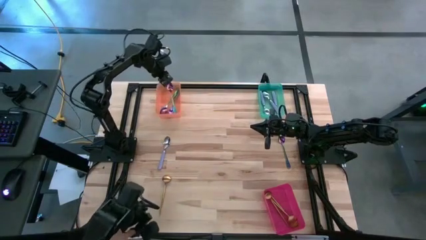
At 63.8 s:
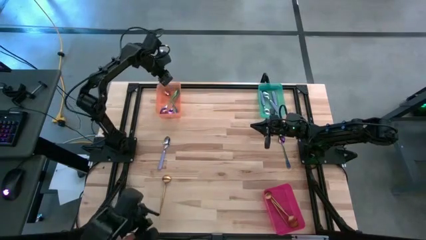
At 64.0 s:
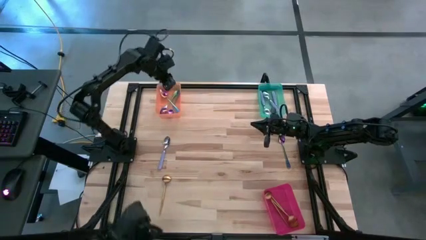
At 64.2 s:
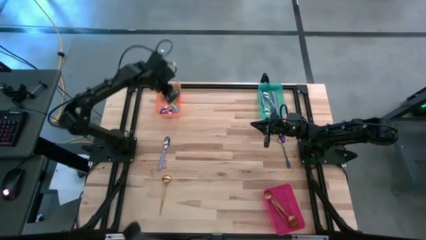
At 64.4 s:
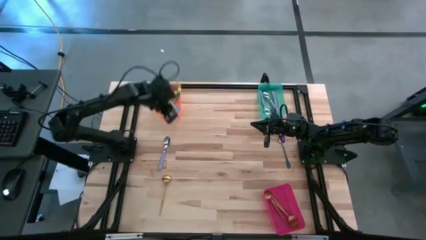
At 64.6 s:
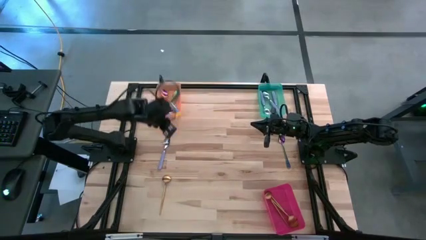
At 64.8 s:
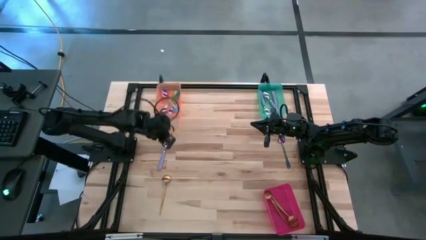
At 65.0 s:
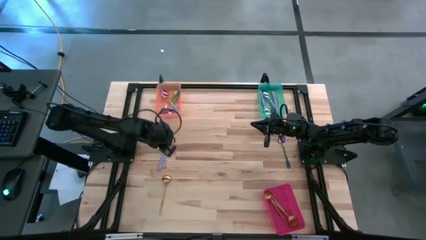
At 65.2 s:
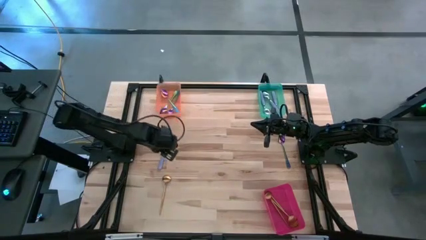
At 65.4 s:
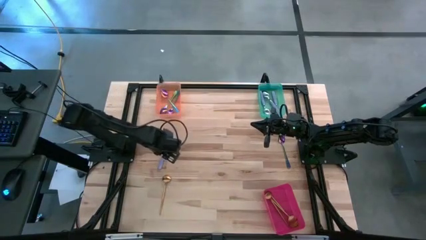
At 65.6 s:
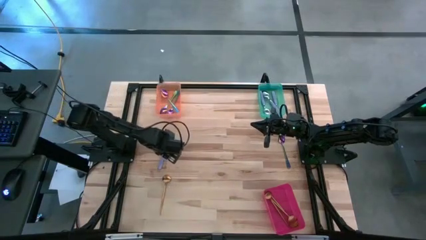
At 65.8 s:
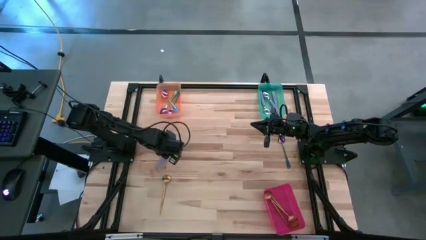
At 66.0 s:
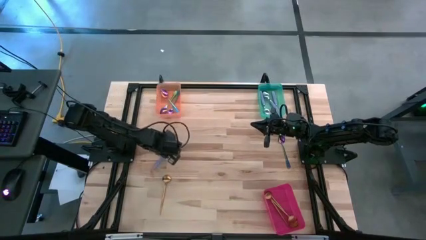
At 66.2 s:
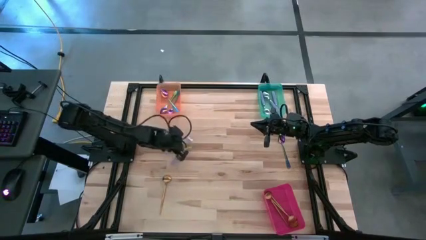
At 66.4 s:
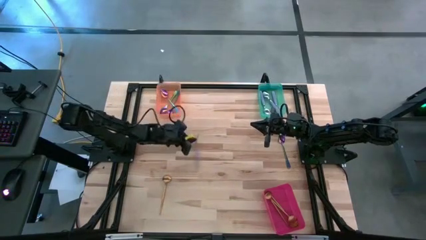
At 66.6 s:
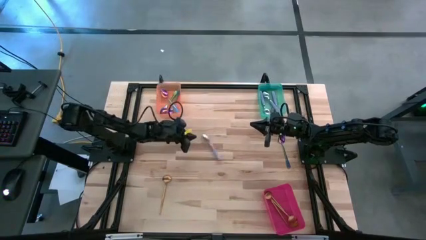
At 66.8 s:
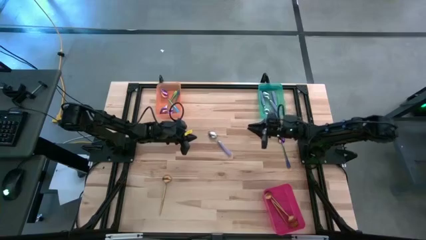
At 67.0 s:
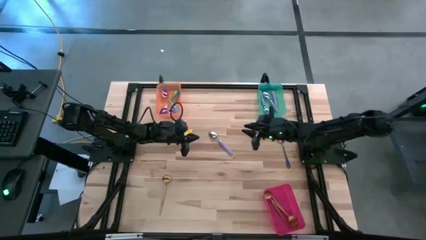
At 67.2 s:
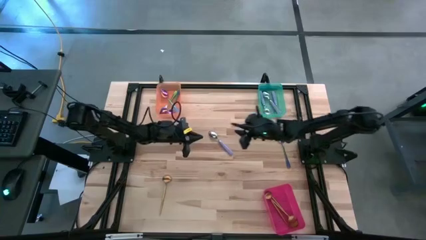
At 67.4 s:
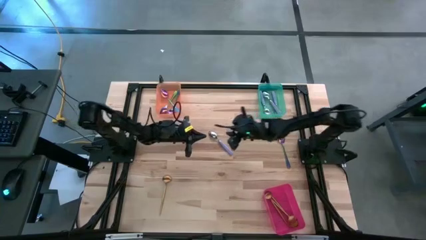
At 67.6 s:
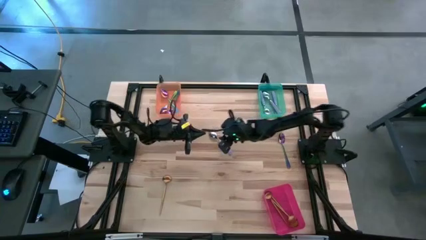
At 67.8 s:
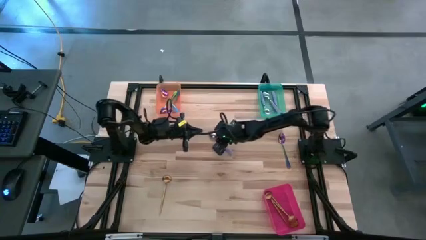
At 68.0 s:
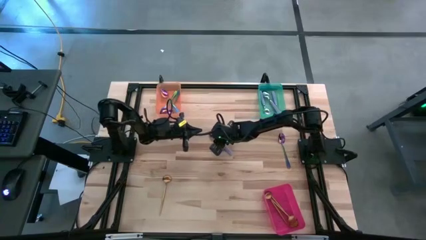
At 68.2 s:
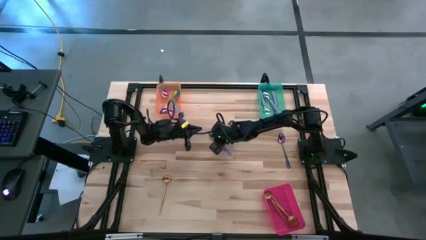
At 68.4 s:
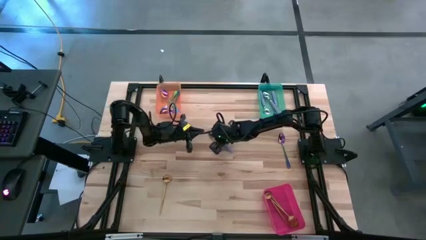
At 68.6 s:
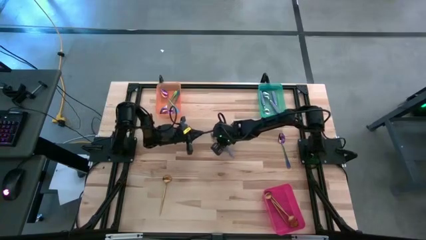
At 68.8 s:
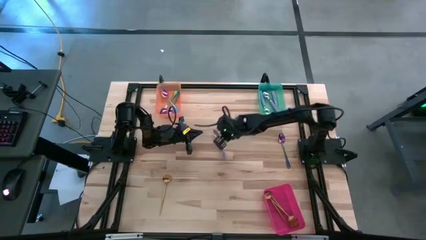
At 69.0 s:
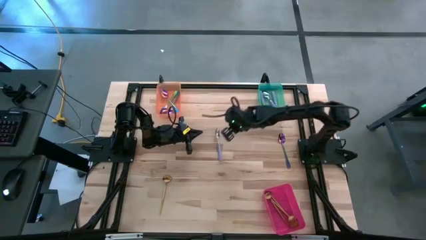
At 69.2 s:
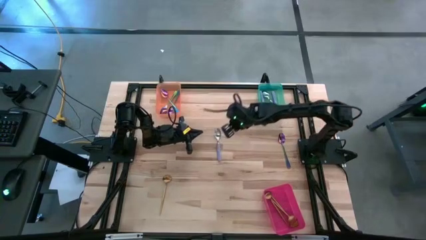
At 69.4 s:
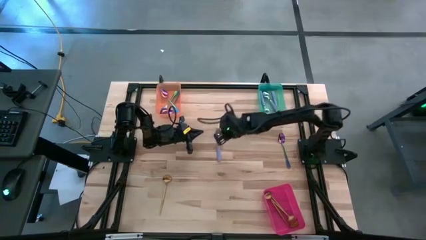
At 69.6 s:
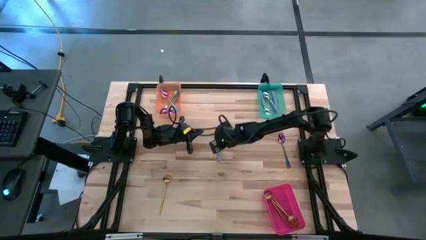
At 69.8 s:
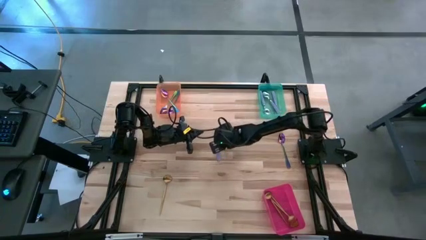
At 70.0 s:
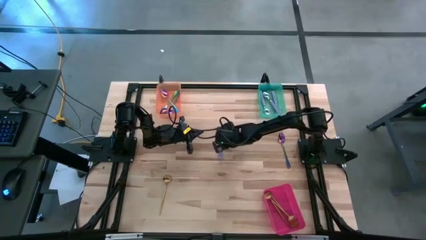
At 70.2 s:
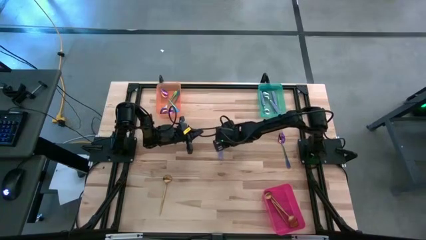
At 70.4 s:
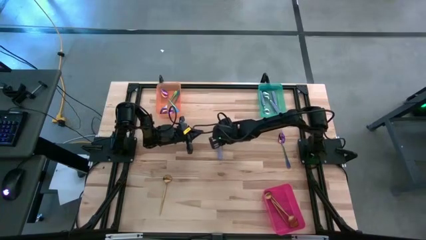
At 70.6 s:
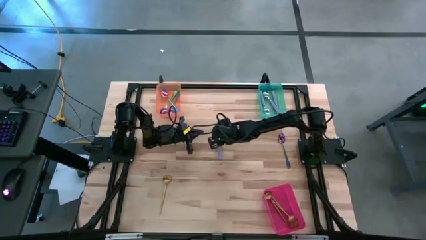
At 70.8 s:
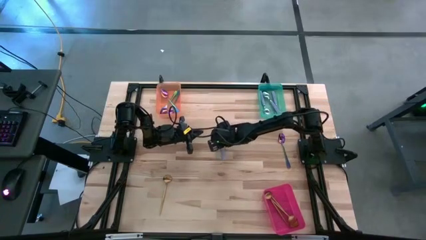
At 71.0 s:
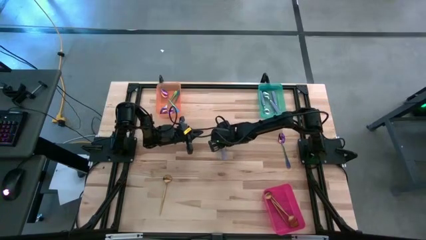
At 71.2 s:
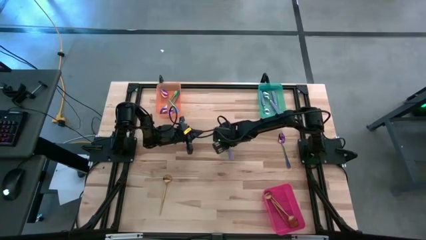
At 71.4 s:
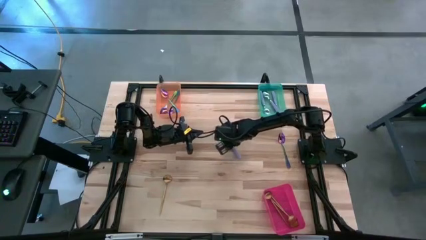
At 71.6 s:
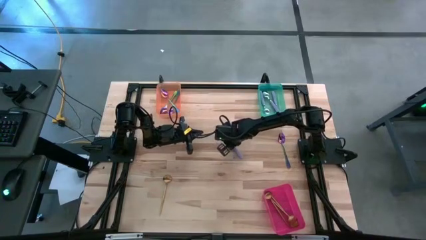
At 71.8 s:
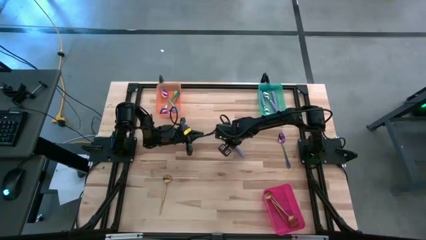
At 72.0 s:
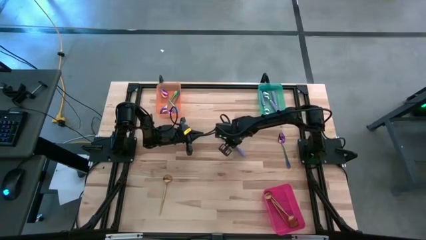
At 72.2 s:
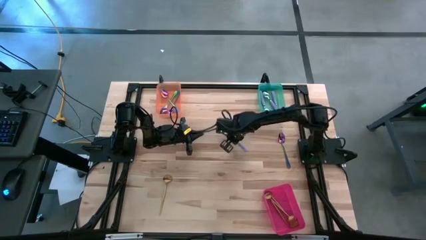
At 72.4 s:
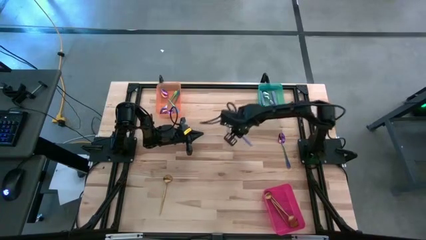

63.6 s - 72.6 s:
Task: Sort silverware by color (type)
Put the purple spoon into the green bin

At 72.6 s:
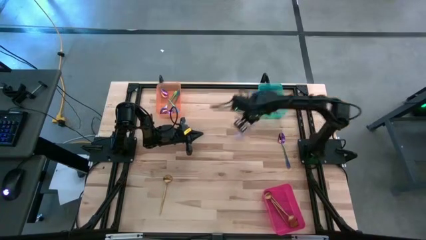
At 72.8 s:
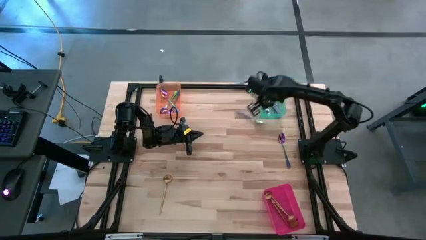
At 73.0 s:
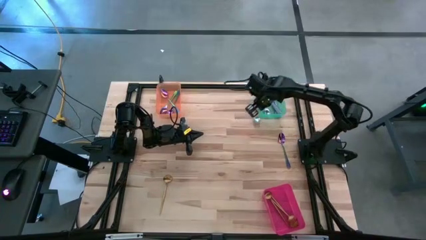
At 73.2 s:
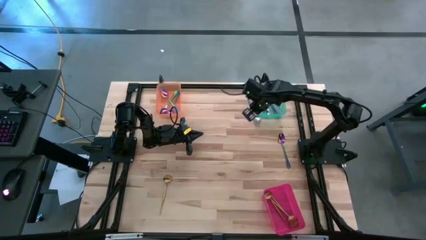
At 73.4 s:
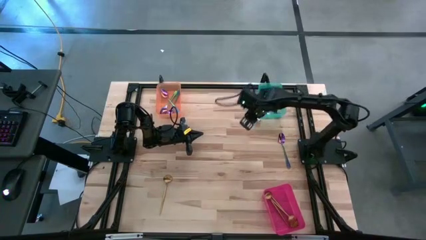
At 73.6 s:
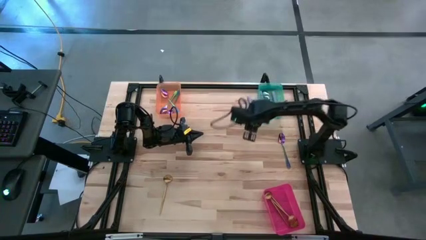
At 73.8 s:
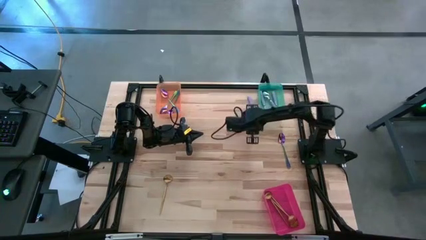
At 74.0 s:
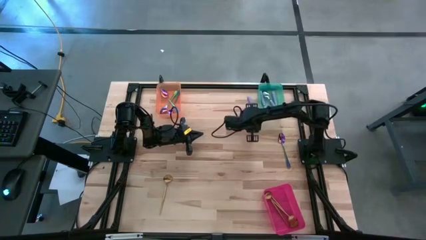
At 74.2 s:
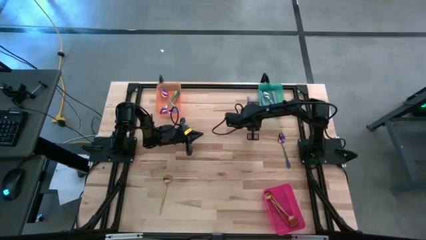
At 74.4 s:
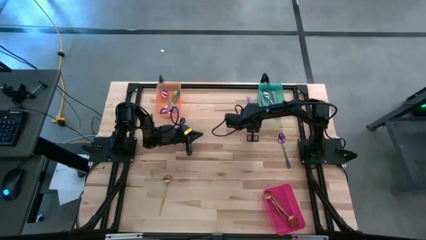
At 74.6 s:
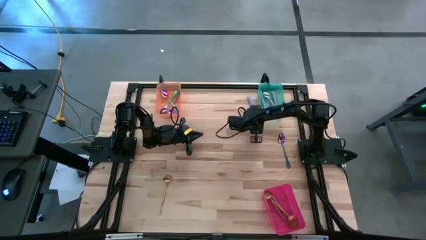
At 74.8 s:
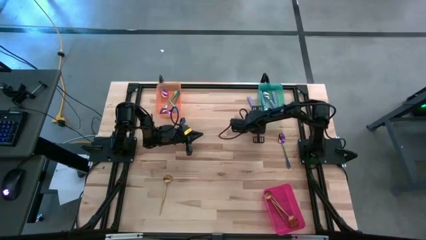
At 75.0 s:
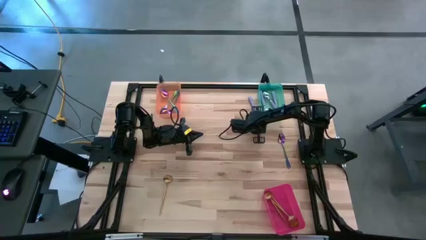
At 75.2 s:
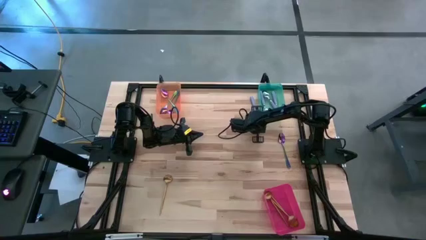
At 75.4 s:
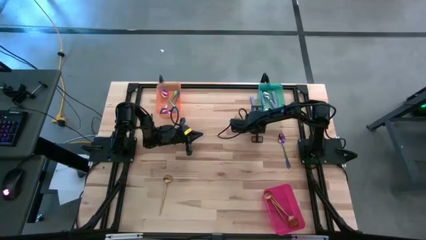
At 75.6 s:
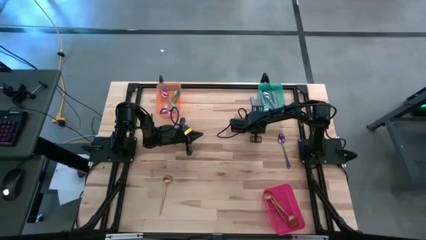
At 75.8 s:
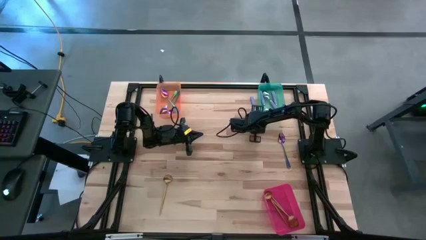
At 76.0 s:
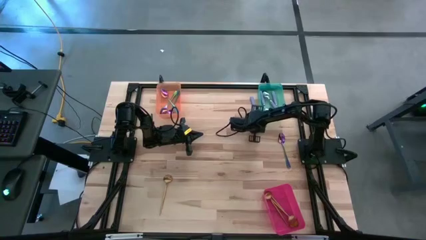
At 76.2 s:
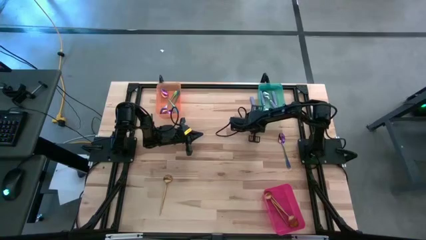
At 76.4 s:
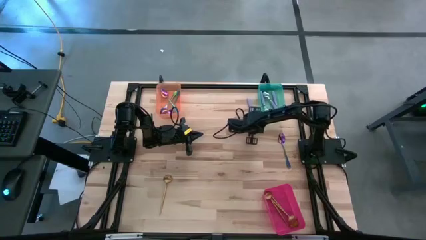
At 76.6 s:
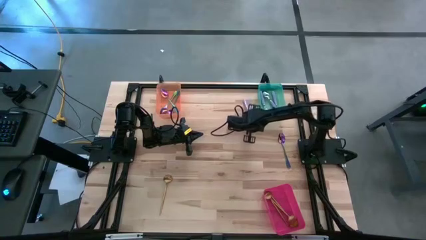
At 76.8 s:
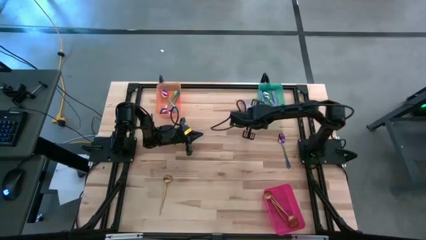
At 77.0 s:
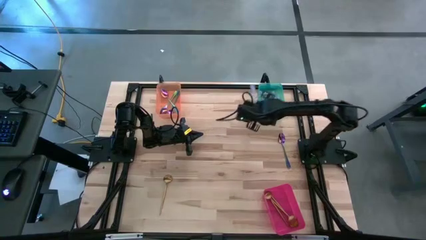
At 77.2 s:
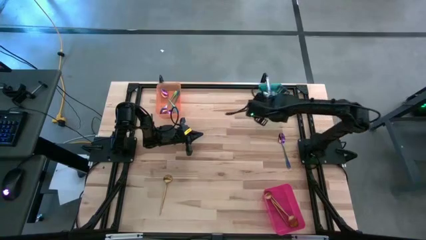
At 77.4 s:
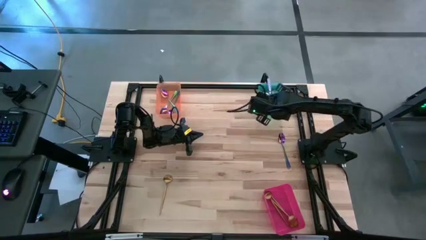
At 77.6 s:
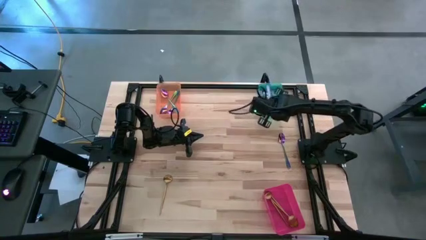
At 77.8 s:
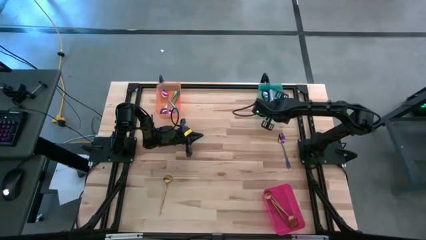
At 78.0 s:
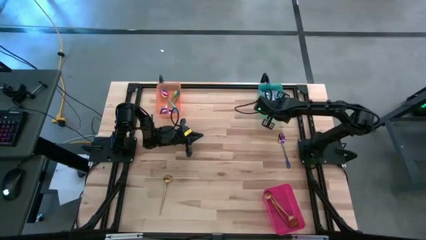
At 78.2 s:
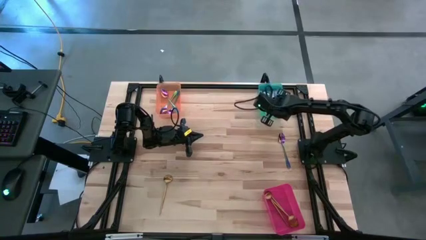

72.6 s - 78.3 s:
Put the purple spoon into the green bin

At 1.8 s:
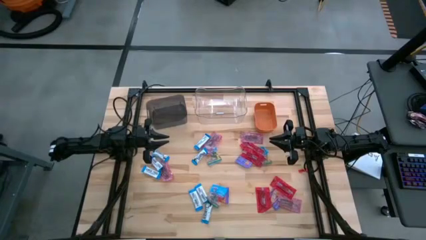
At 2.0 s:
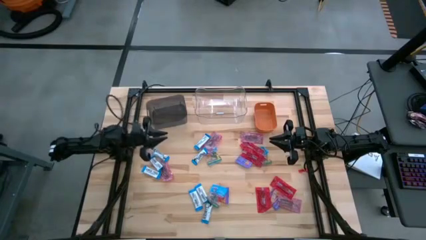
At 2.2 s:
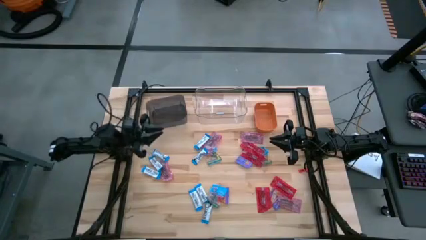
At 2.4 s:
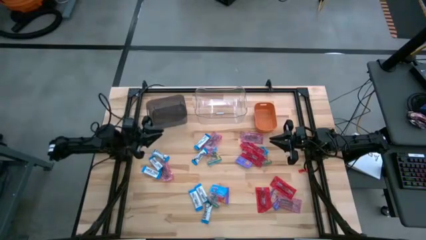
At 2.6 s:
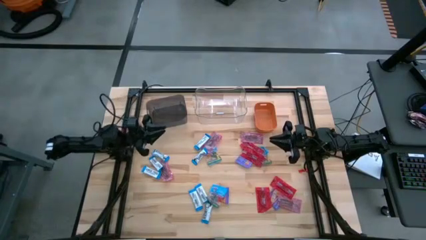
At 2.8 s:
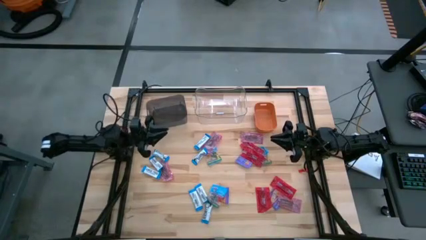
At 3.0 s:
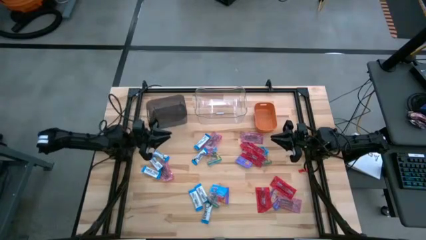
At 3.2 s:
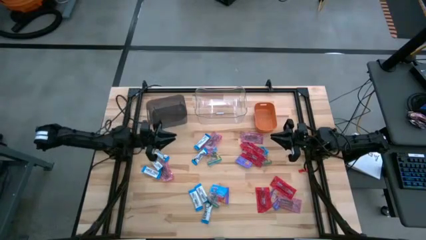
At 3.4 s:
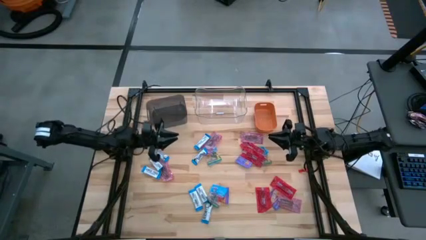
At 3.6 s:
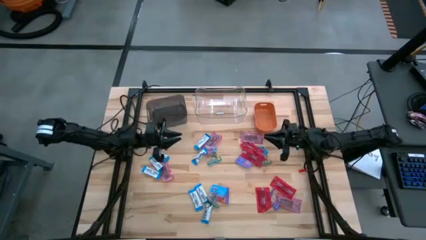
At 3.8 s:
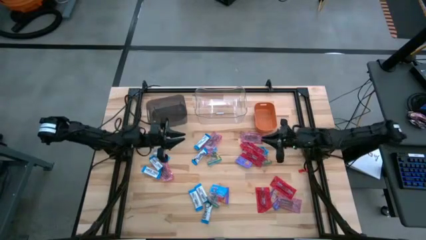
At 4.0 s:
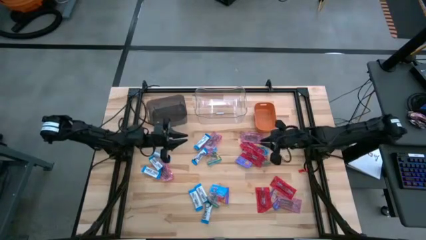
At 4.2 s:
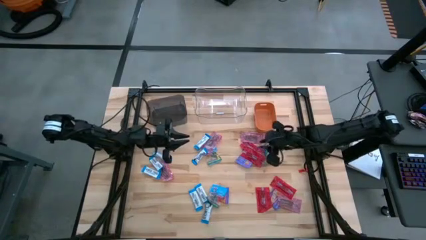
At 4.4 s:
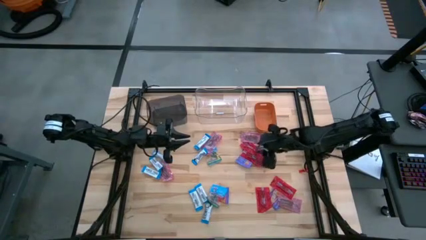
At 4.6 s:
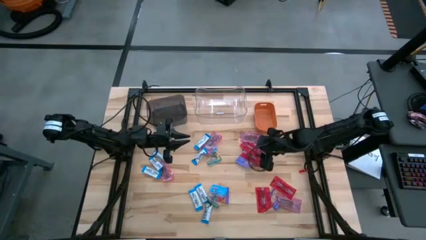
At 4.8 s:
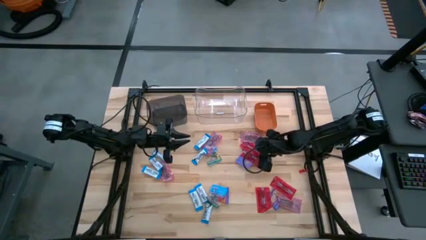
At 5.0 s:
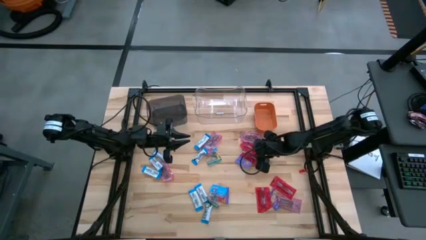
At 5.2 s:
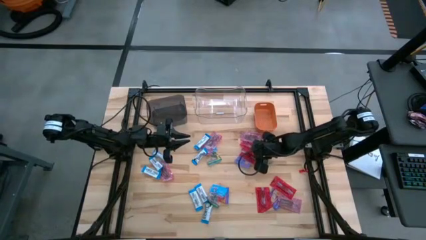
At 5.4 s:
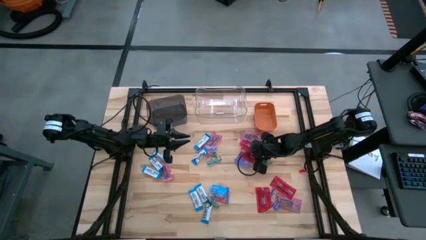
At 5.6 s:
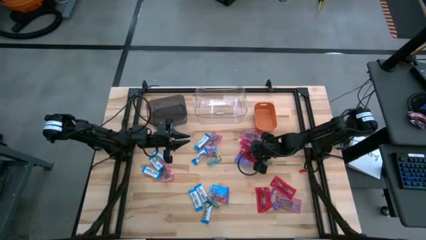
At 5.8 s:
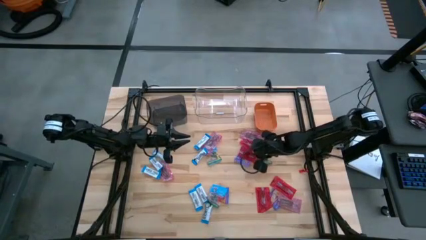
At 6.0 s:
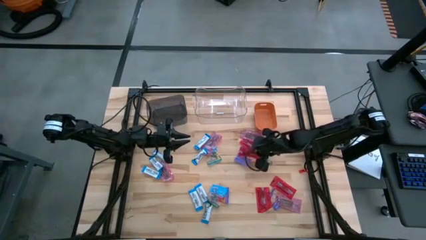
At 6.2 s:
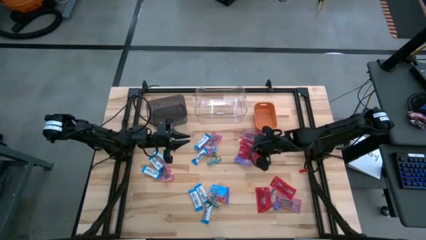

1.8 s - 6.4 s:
Task: Sort candy
Put the red chocolate into the transparent bin
